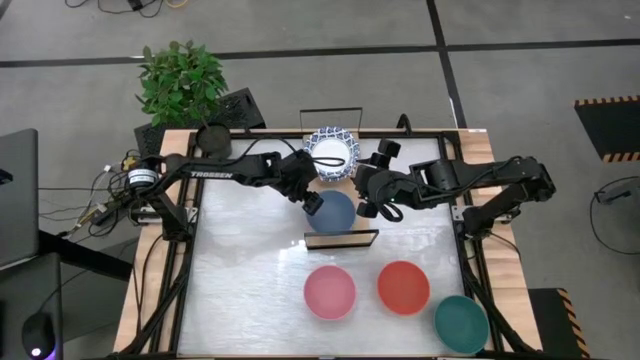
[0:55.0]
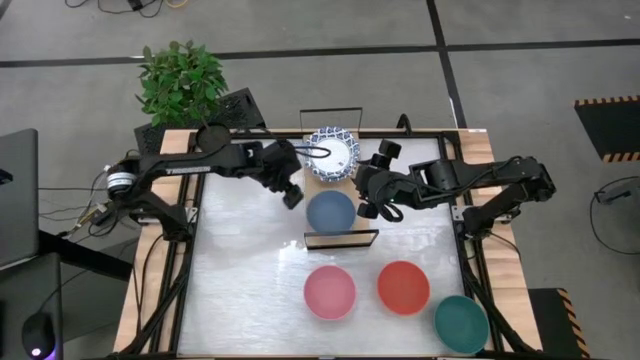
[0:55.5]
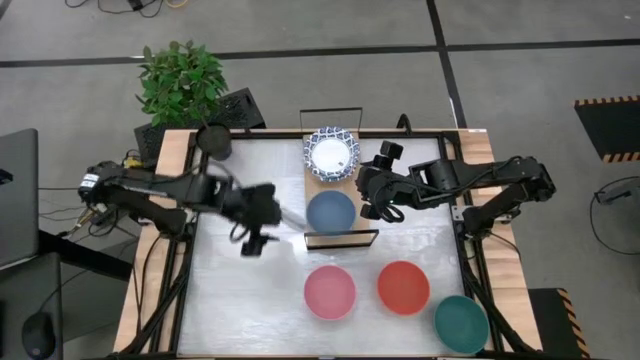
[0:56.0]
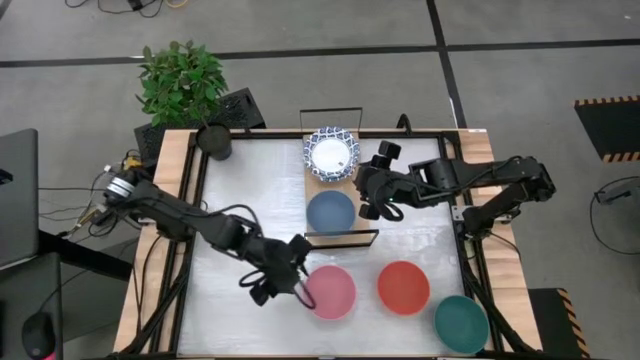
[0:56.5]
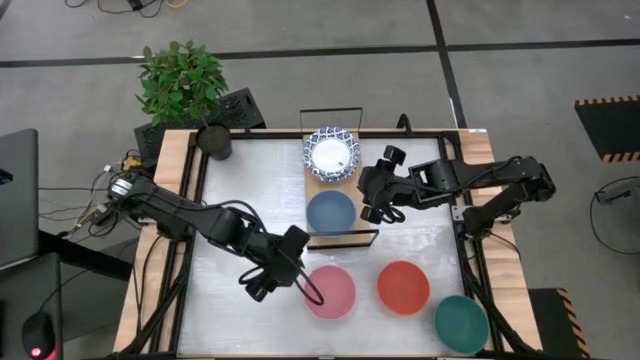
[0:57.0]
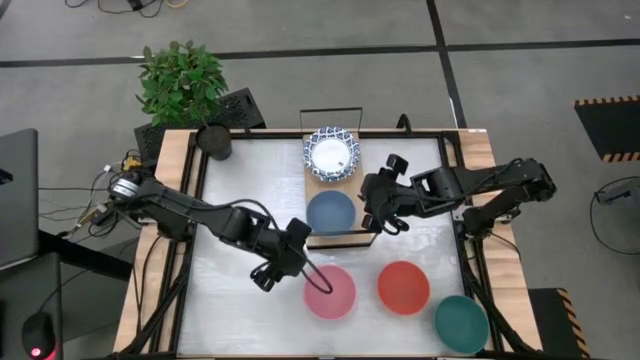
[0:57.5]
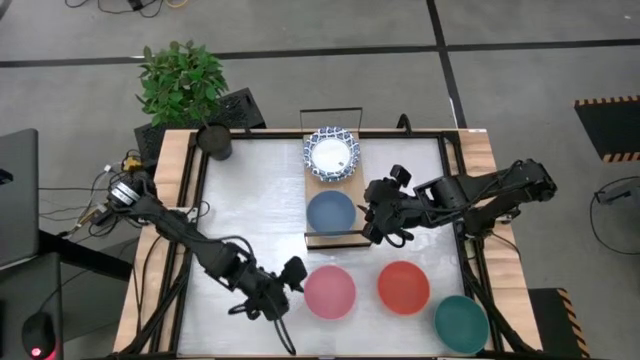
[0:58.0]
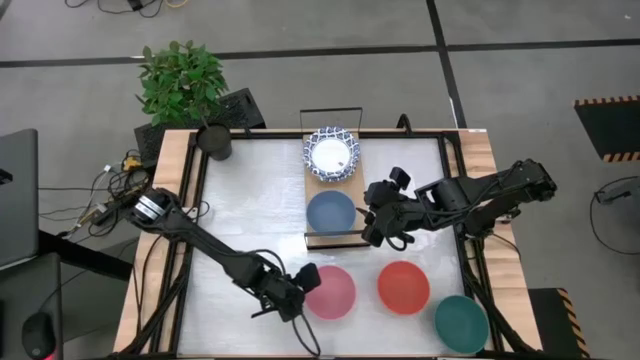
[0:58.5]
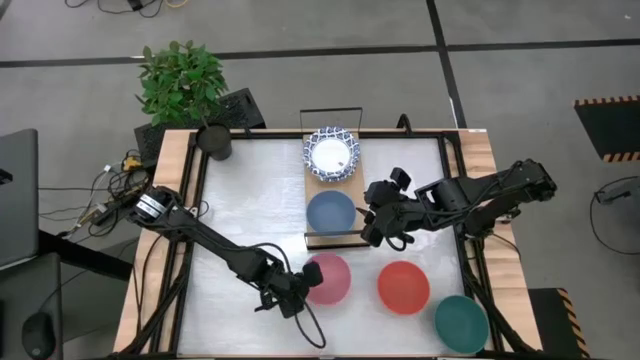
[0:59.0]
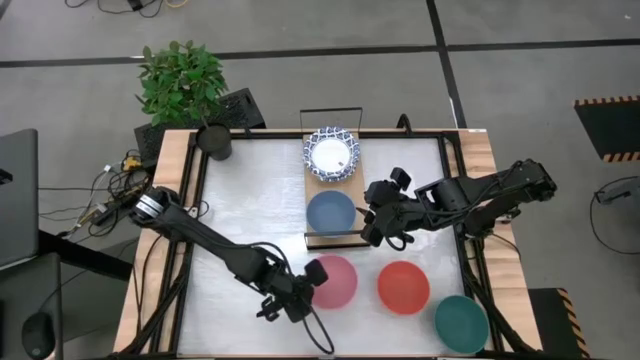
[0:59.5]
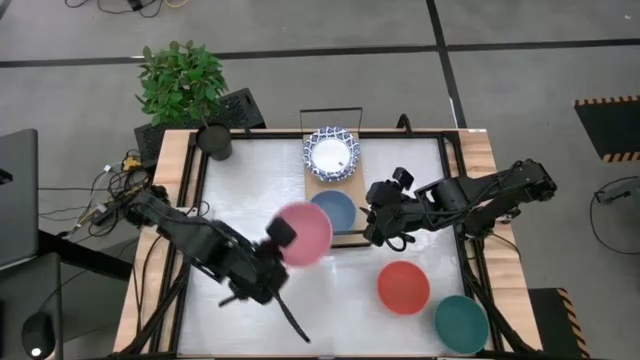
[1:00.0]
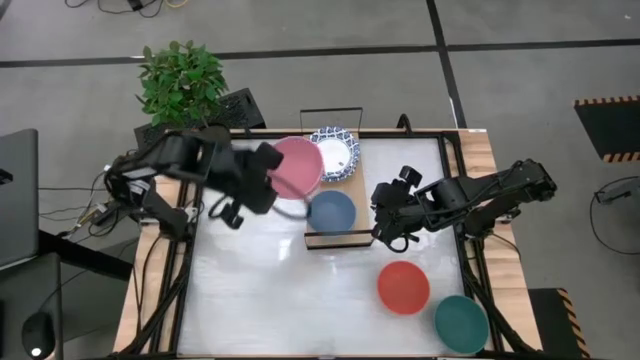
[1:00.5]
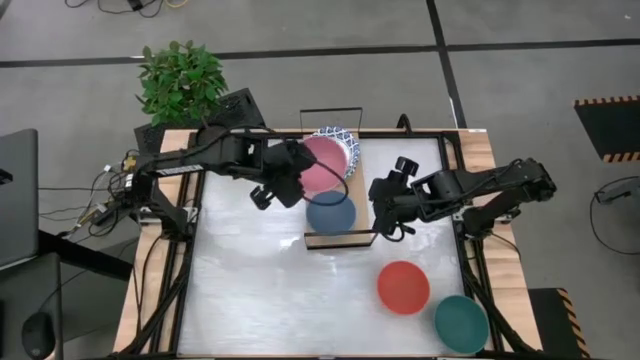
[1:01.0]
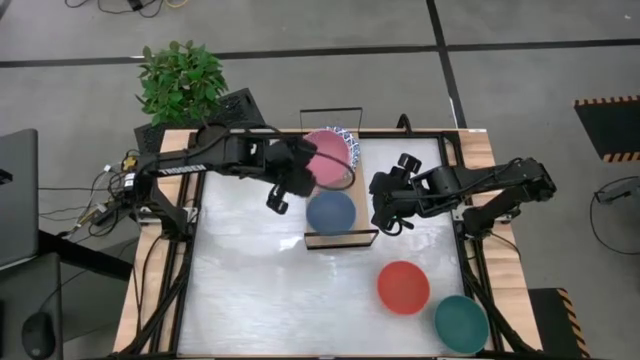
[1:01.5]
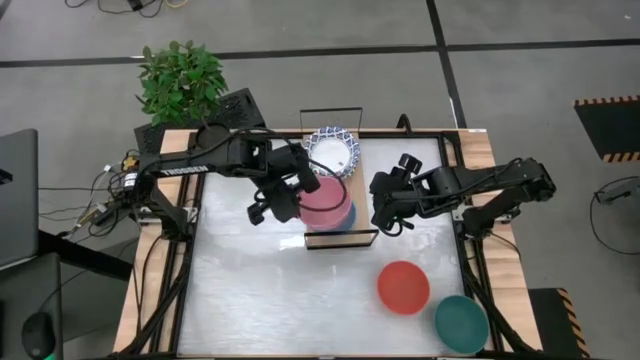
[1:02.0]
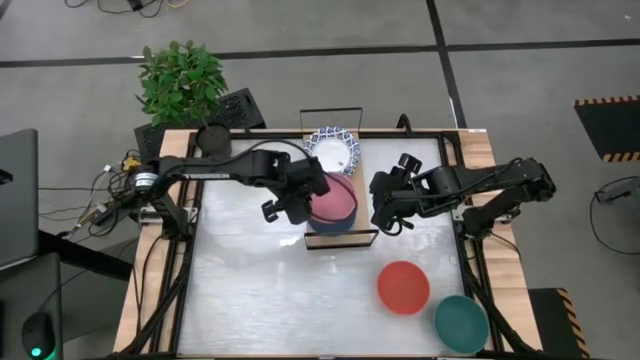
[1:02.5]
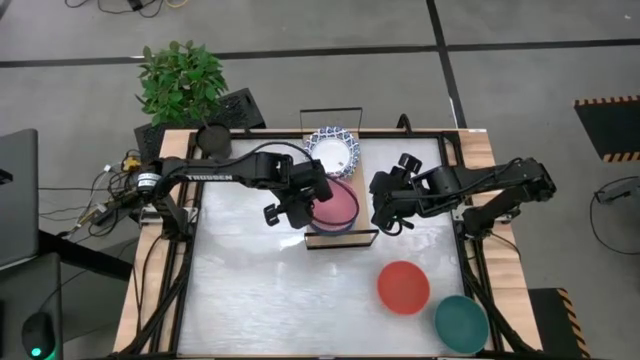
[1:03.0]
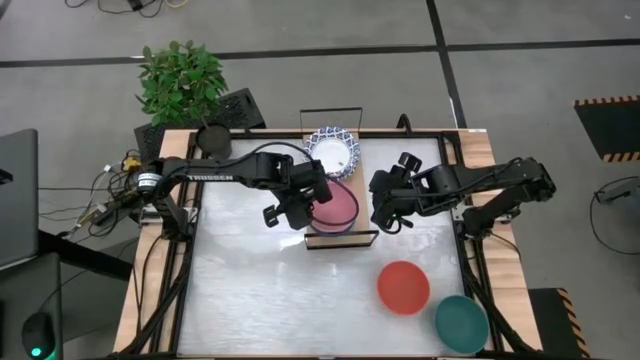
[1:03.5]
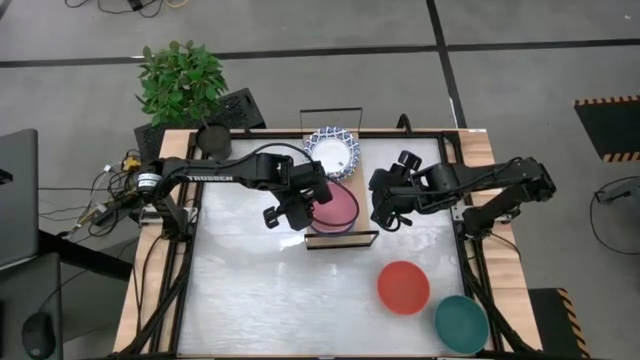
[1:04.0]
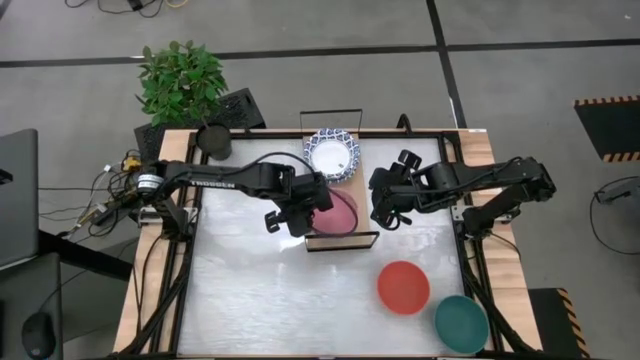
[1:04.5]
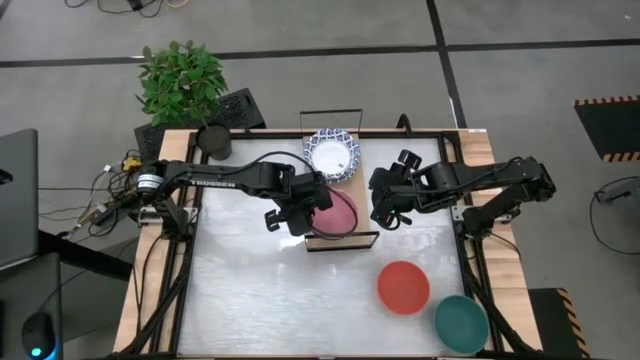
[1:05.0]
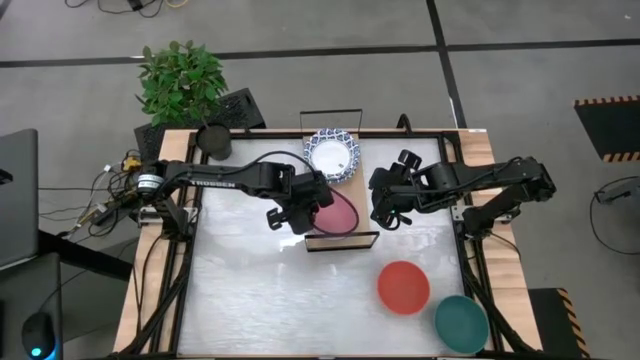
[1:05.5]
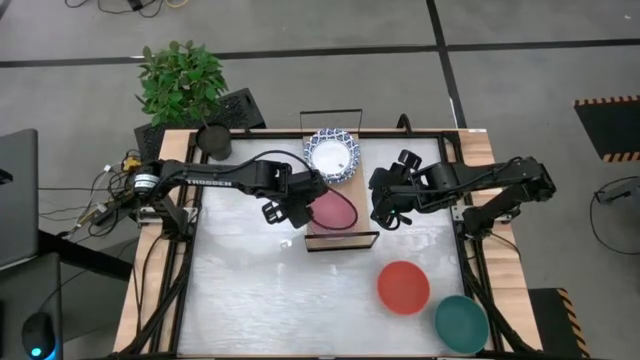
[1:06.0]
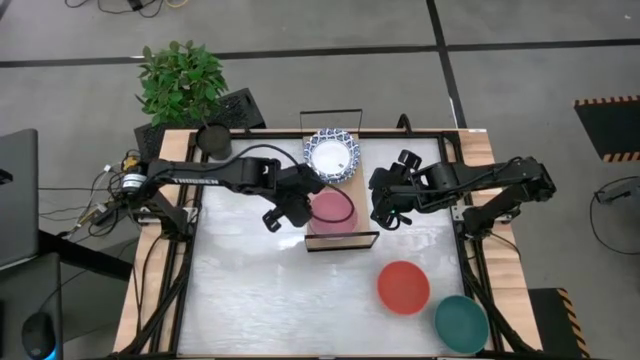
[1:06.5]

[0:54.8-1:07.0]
Task: Place and stack bowls onto a shelf
Stack the pink bowl on top of the blue bowl on the shelf

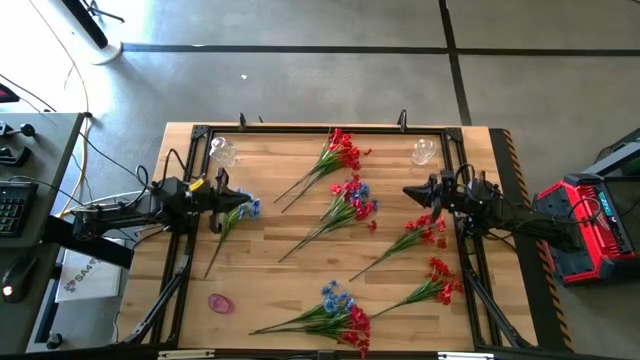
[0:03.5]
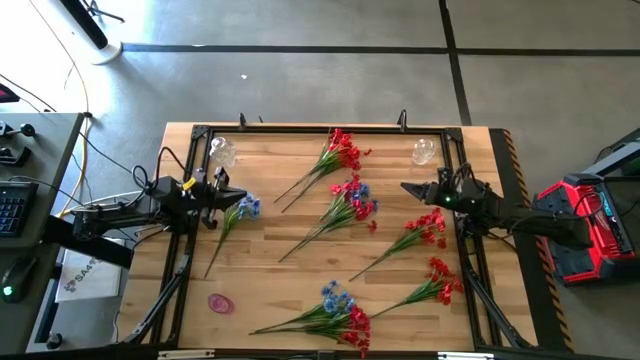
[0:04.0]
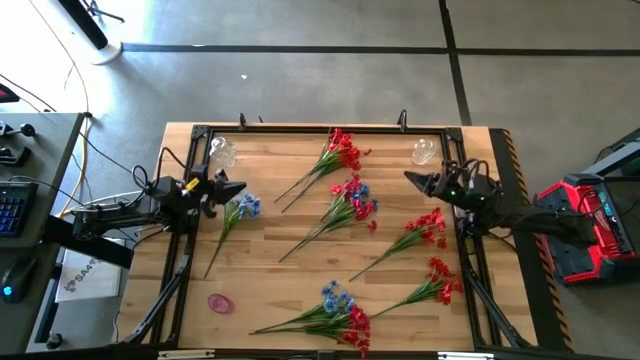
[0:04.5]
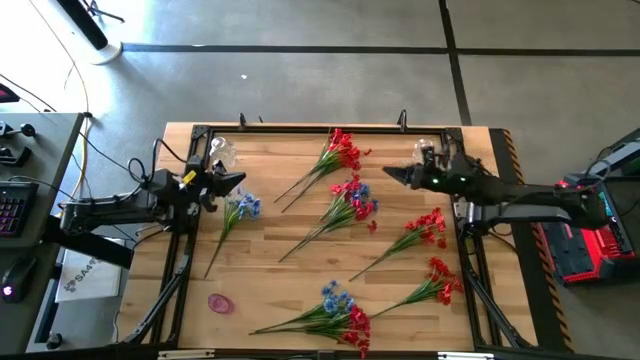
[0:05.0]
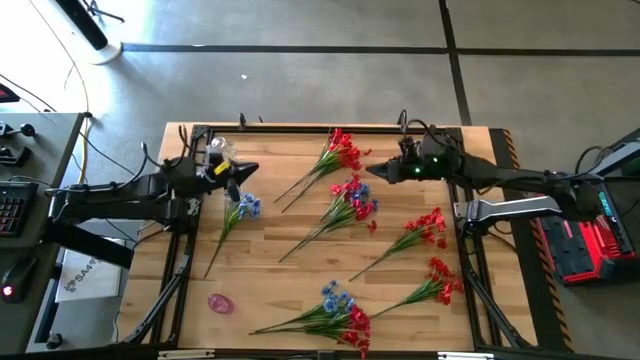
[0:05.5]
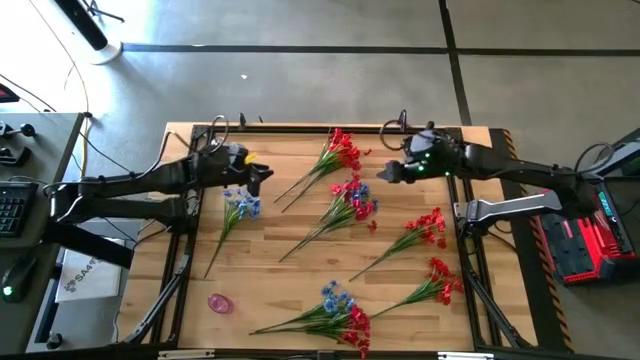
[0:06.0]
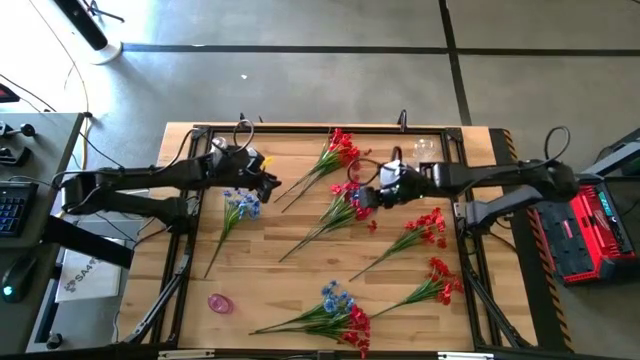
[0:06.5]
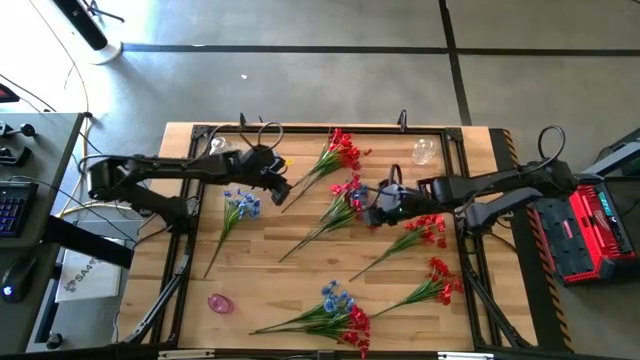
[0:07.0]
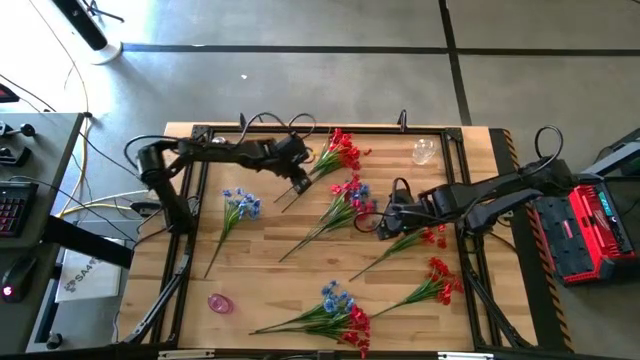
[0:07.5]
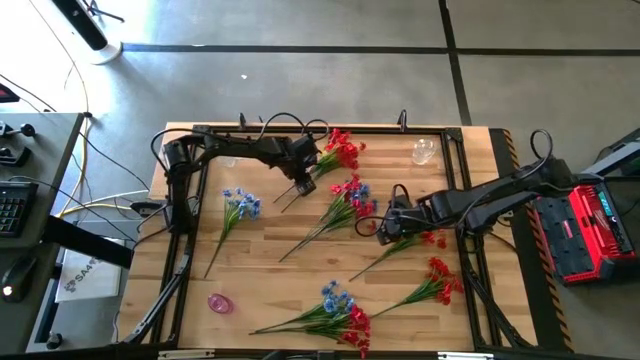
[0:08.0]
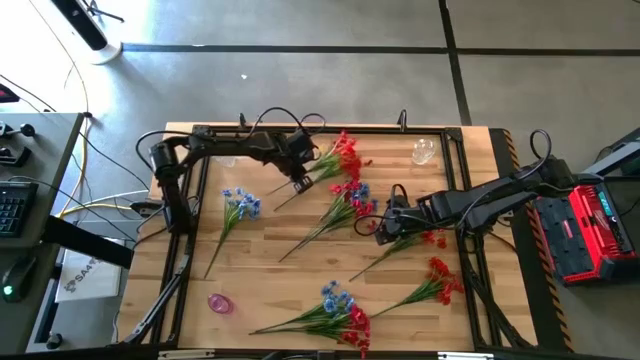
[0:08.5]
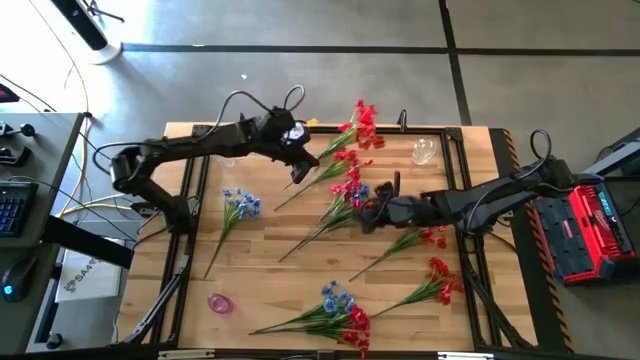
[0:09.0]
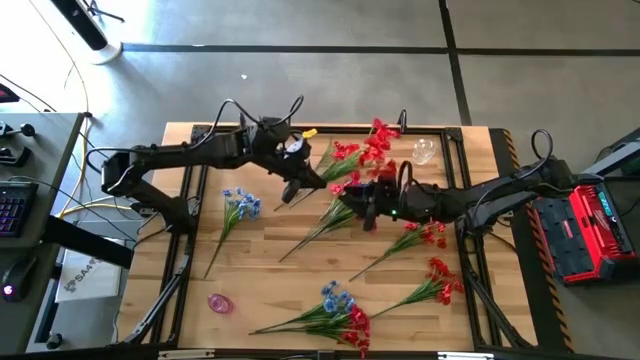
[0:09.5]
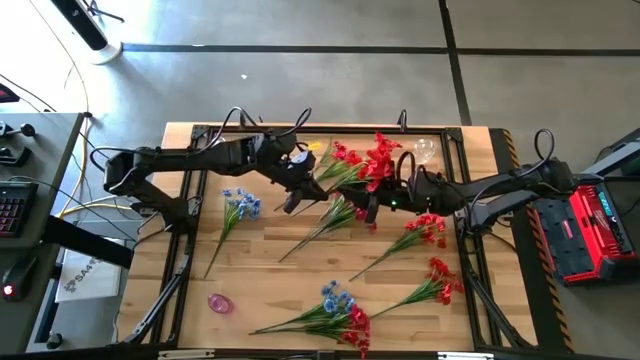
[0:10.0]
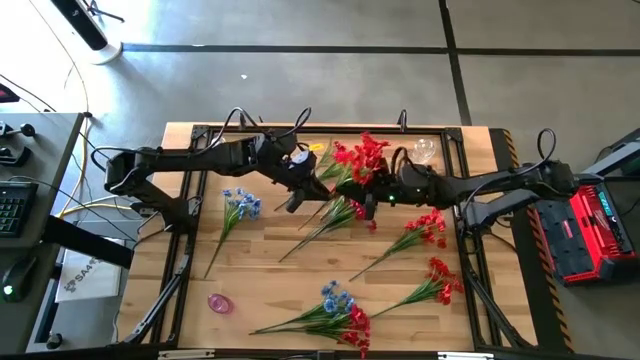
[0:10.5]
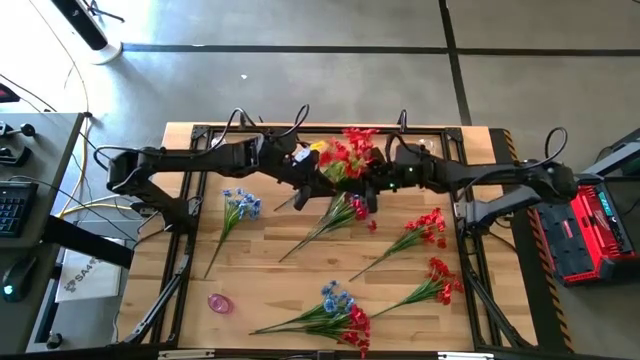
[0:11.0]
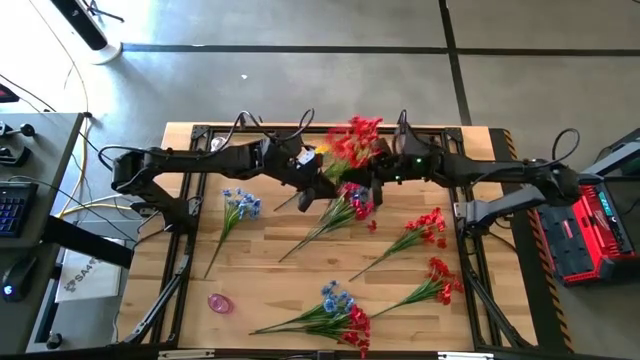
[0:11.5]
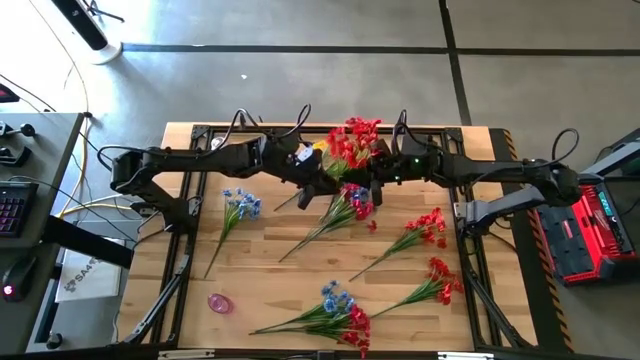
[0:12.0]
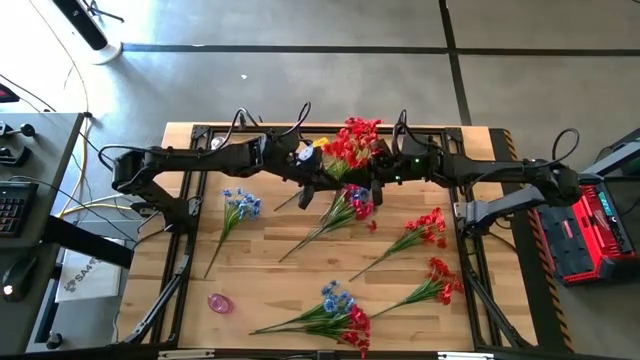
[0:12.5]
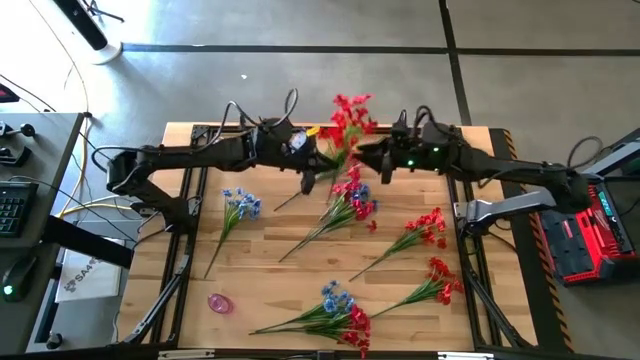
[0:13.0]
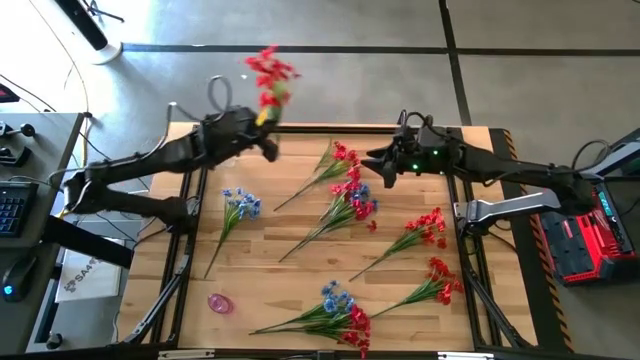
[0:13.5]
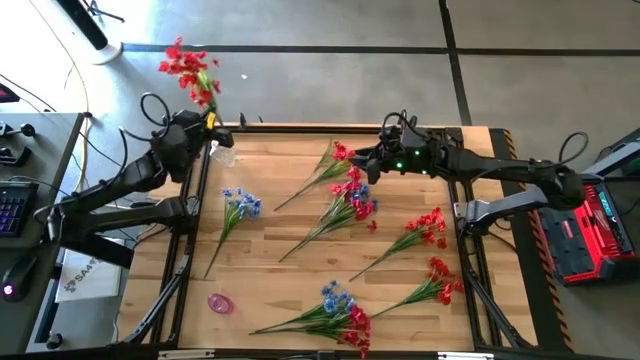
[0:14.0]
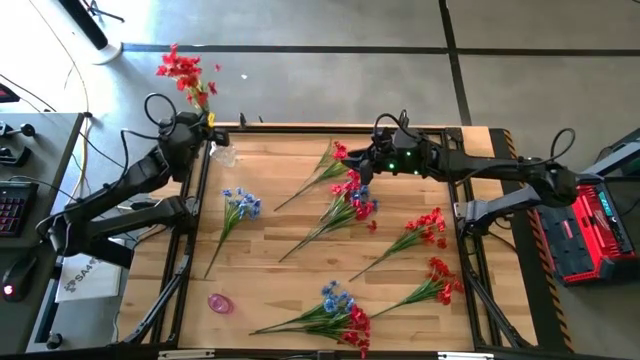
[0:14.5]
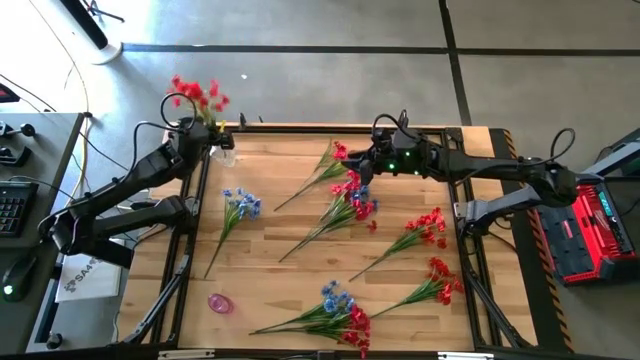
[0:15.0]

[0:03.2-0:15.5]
Task: Sort flowers into vase by color
Put the top red flower into the left transparent vase
